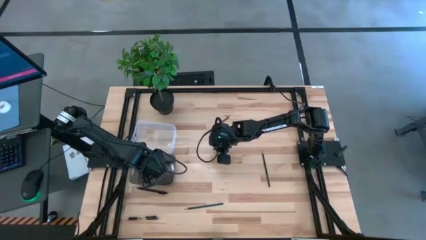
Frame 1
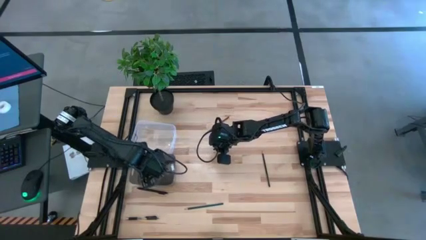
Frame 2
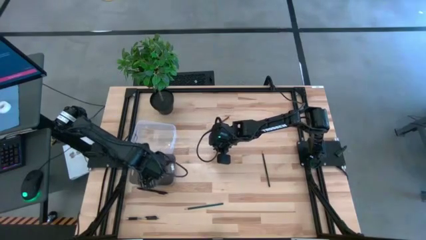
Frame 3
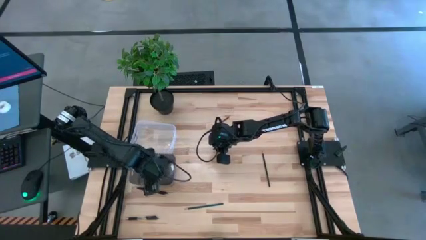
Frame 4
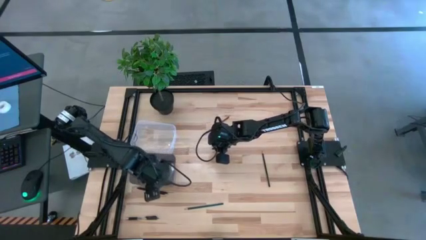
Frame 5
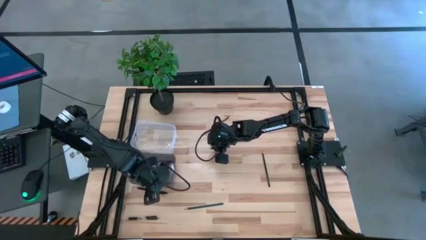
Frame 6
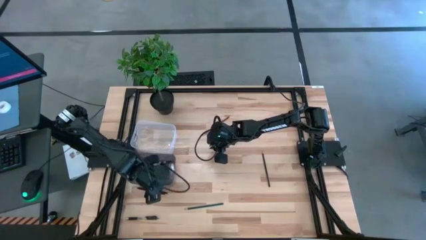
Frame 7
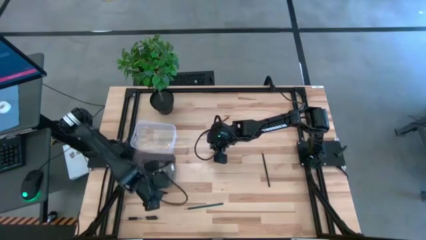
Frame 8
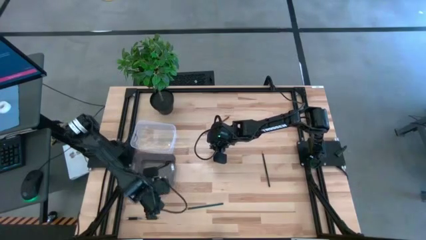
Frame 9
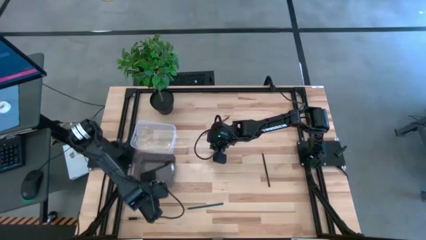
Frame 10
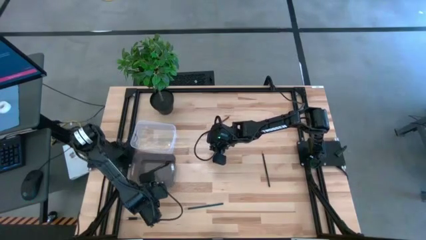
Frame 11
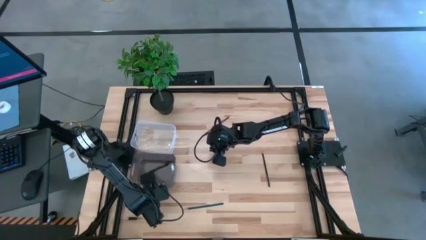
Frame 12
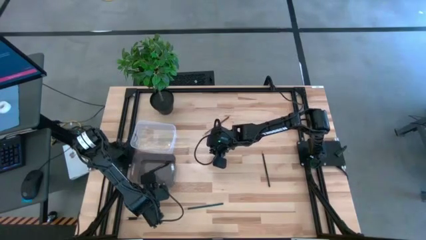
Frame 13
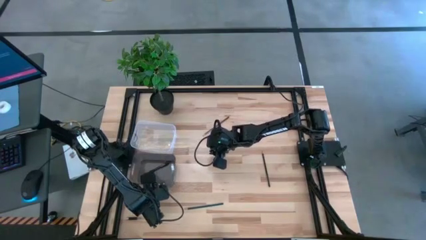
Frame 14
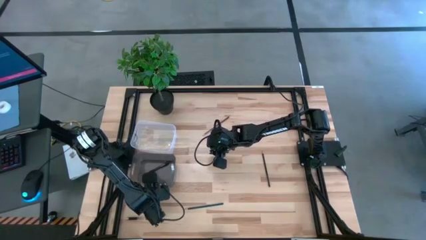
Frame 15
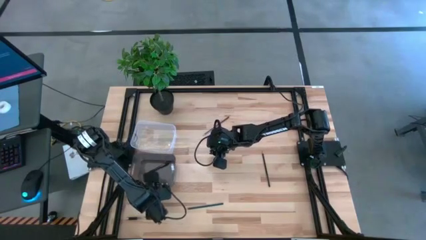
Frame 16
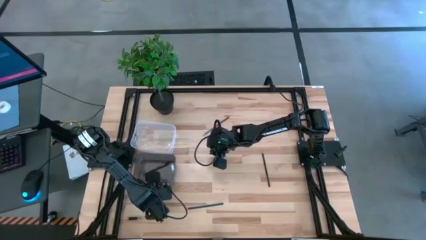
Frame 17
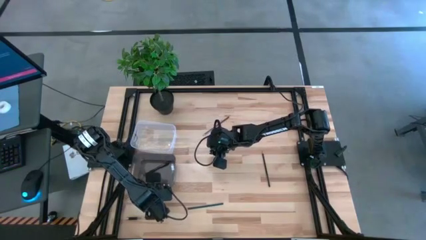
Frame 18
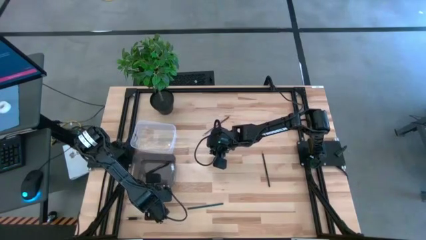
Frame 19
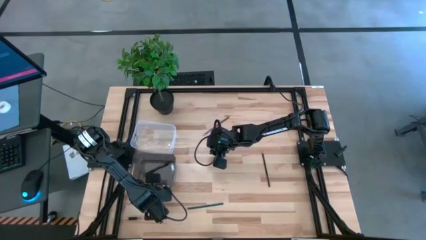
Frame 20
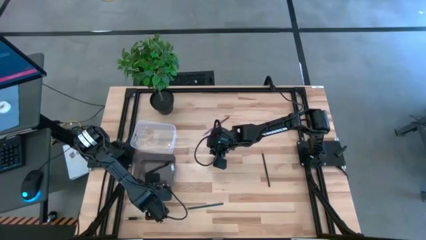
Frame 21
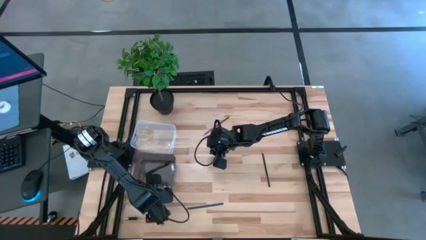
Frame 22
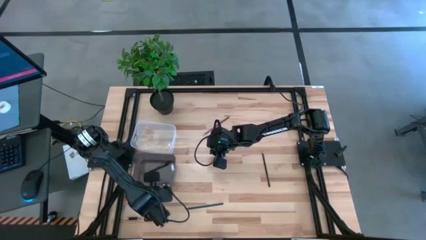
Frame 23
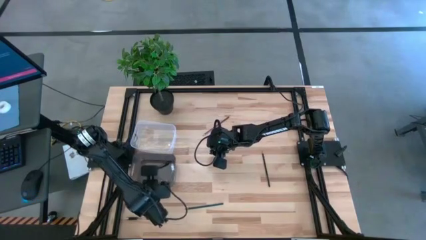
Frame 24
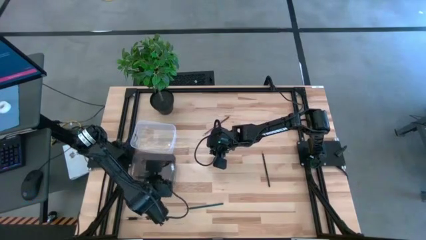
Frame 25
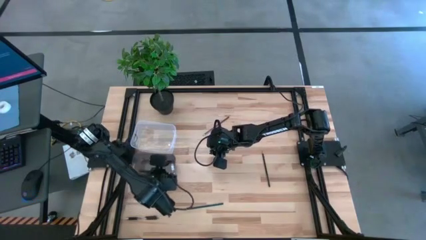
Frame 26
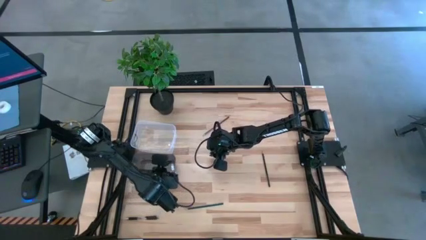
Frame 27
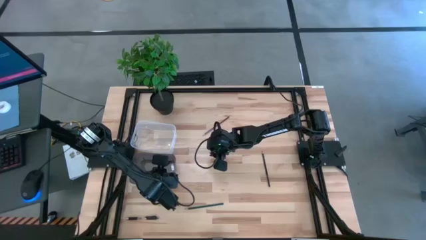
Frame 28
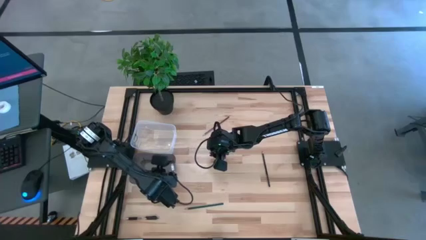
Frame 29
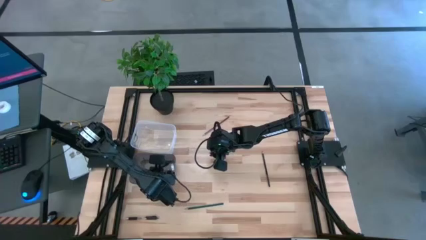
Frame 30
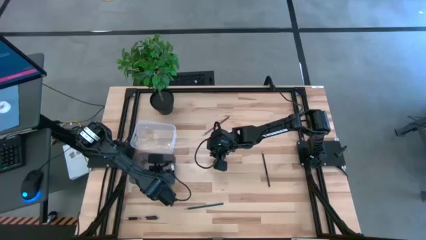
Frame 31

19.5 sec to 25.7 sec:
Task: Sort pens & pencils
Put the top black pen into the black bin

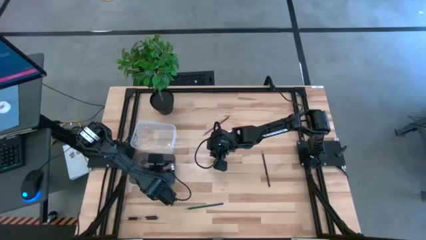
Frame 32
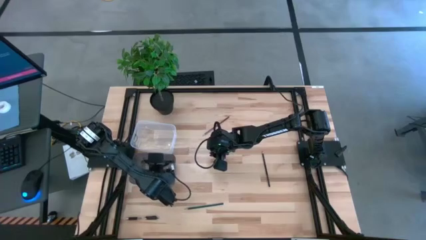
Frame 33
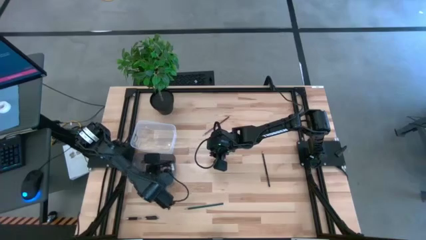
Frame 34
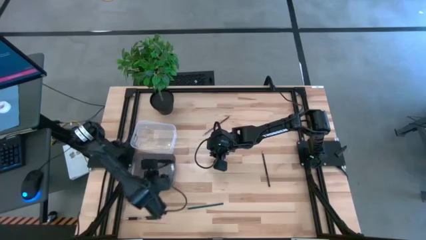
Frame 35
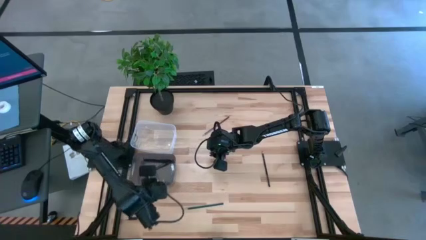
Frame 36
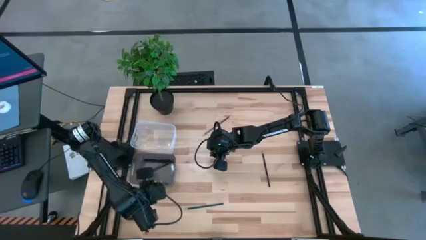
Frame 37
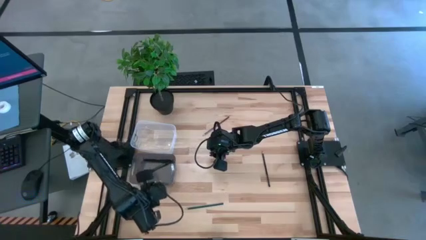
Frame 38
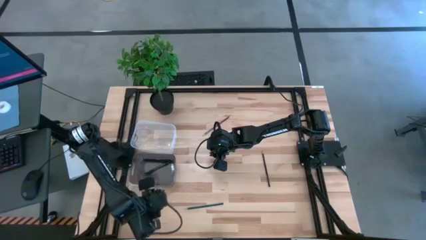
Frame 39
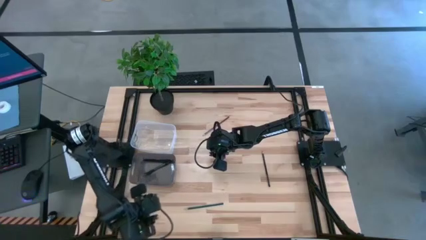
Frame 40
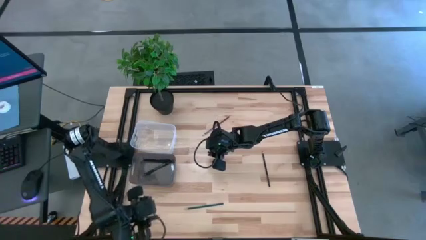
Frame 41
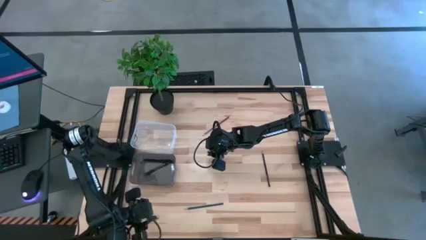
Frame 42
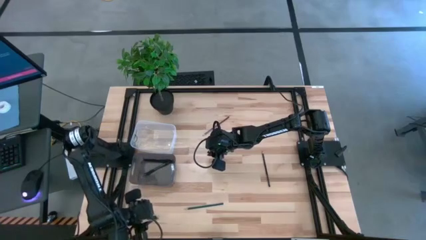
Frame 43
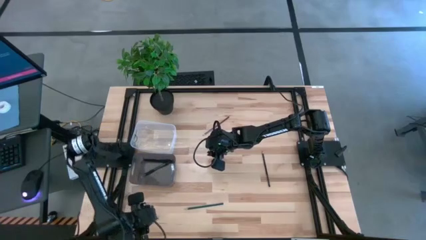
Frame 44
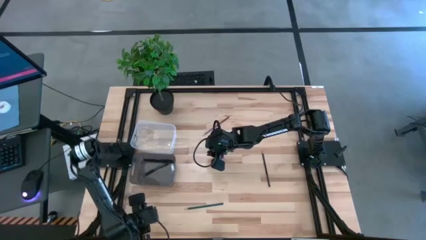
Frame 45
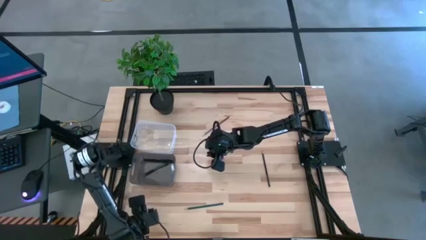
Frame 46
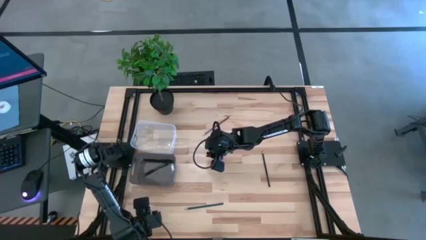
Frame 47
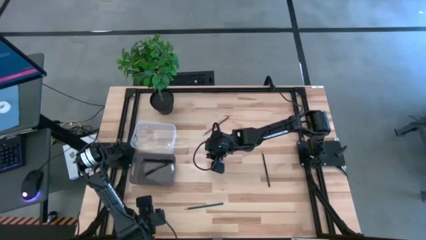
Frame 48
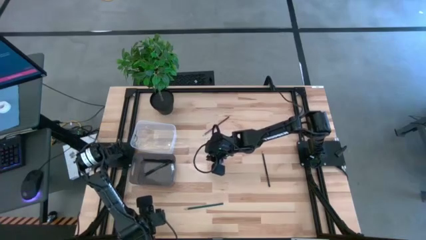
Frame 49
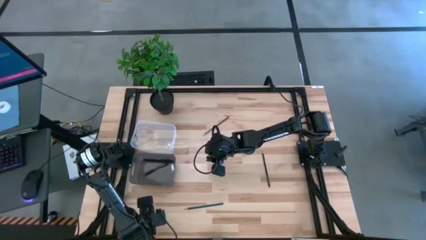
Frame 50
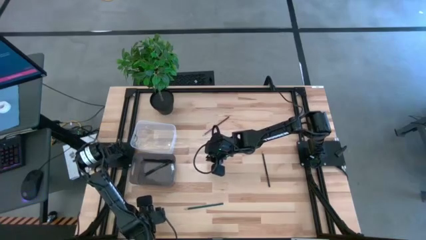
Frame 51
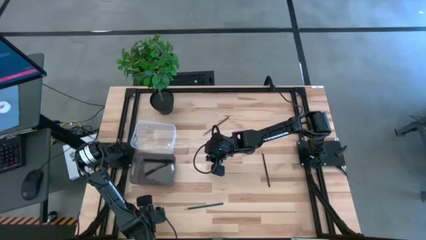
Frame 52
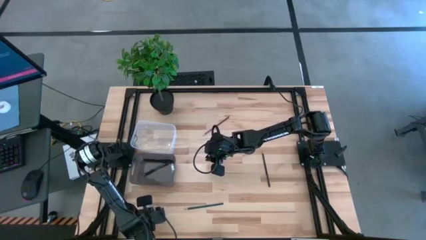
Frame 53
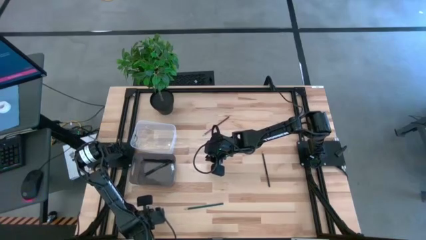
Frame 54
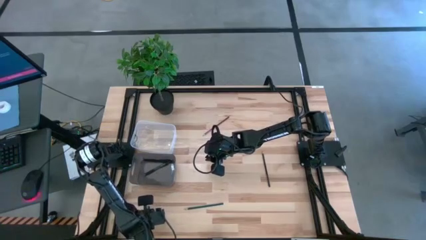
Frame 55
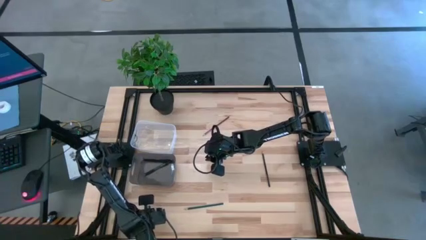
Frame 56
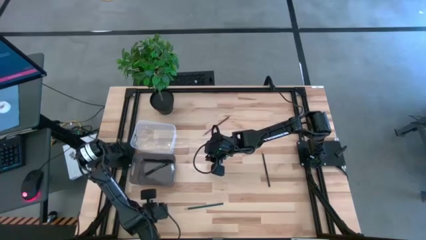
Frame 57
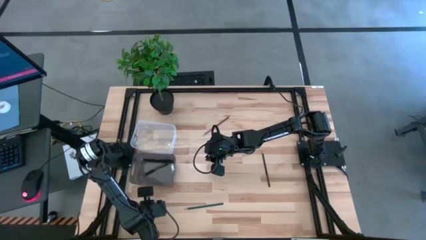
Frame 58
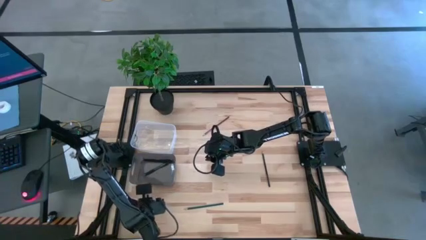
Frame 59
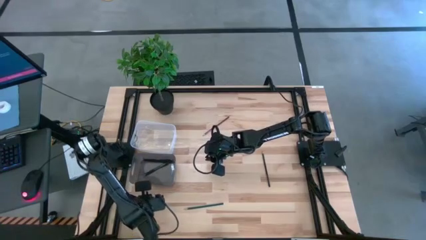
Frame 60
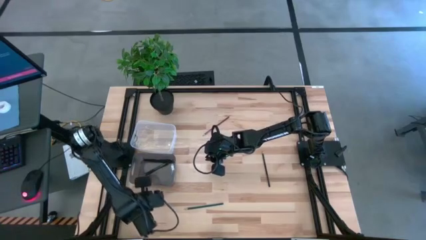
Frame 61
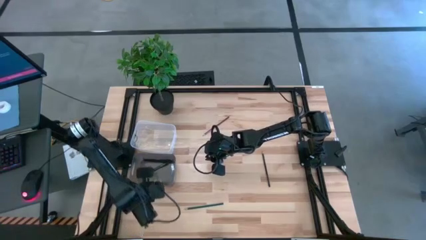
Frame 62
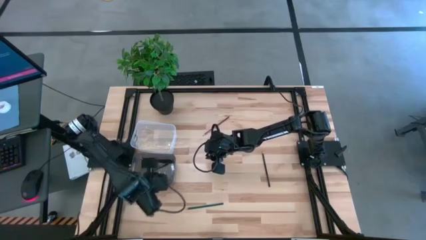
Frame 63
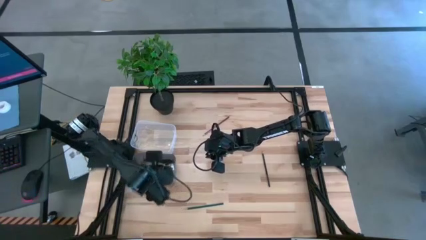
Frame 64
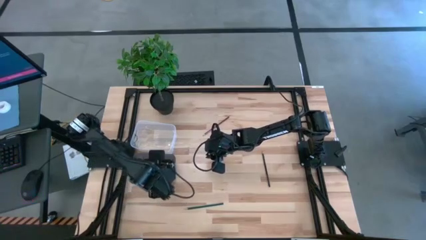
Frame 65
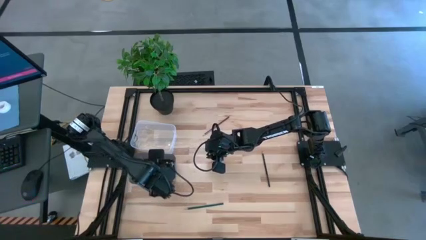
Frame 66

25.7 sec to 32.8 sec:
Put the bottom left black pen into the black bin
